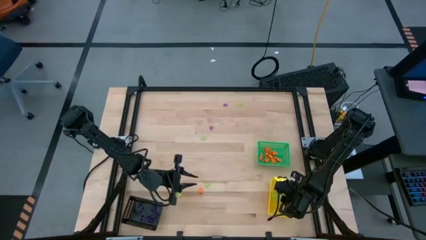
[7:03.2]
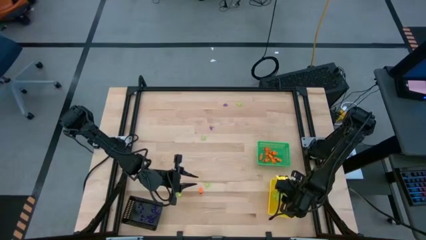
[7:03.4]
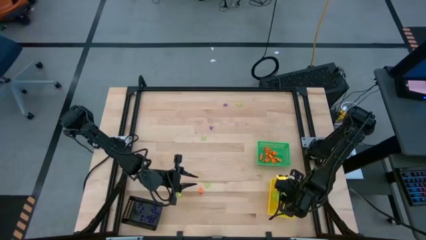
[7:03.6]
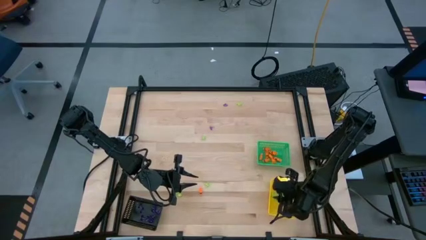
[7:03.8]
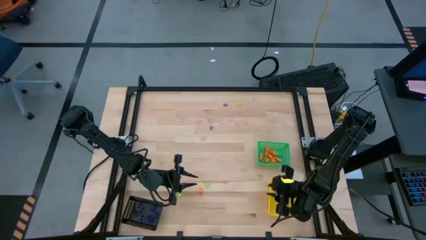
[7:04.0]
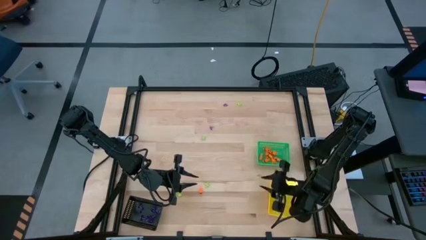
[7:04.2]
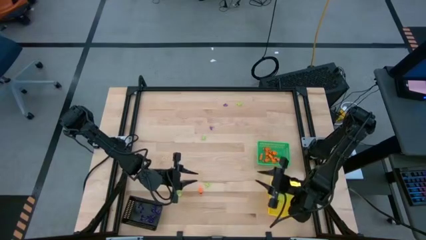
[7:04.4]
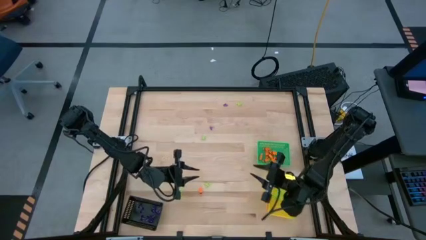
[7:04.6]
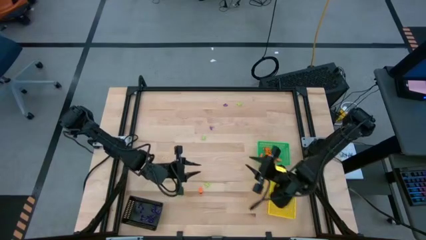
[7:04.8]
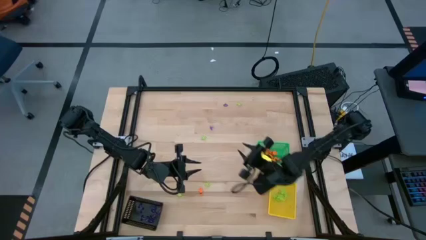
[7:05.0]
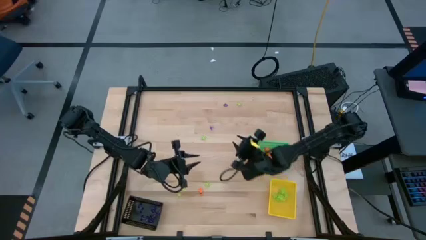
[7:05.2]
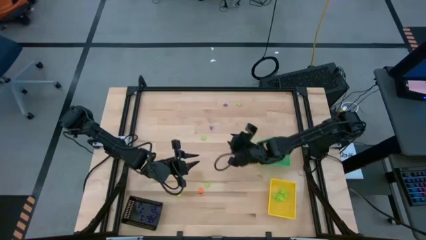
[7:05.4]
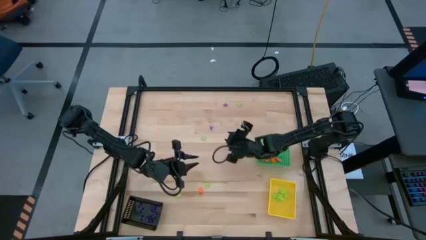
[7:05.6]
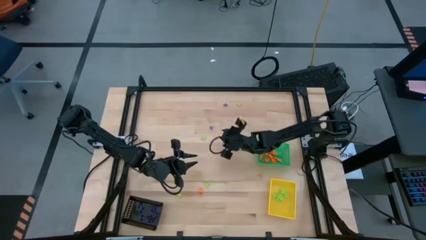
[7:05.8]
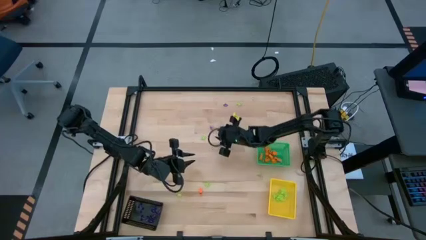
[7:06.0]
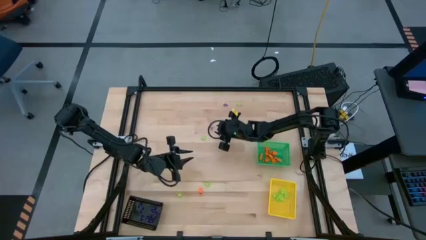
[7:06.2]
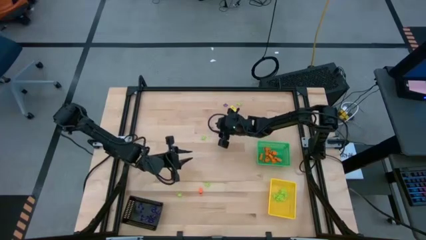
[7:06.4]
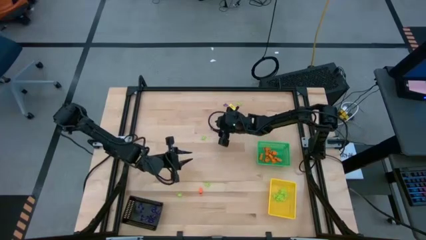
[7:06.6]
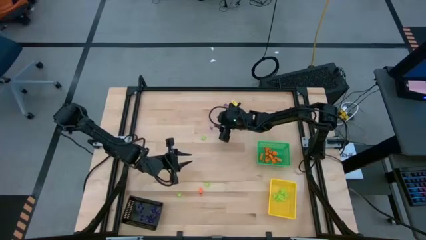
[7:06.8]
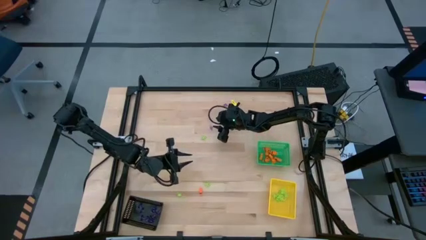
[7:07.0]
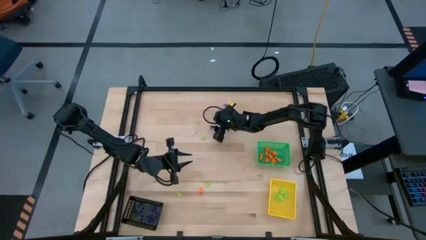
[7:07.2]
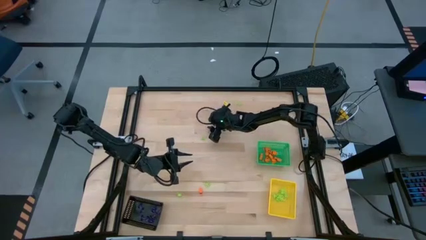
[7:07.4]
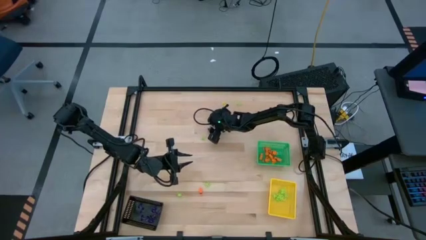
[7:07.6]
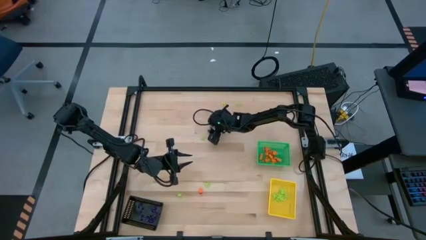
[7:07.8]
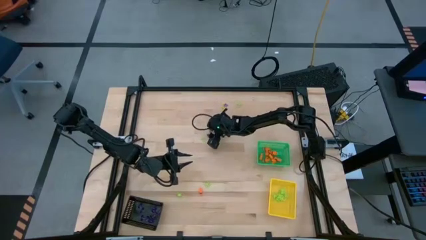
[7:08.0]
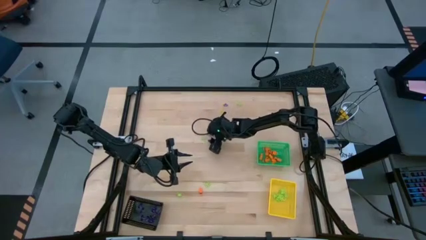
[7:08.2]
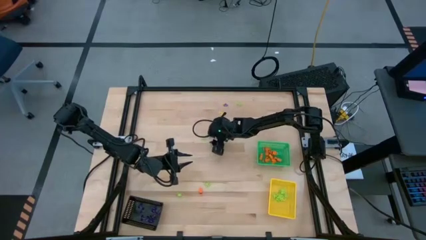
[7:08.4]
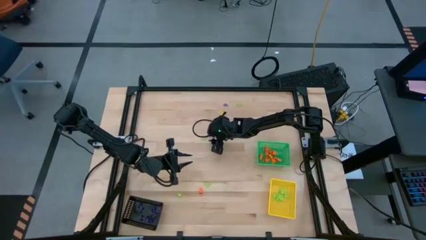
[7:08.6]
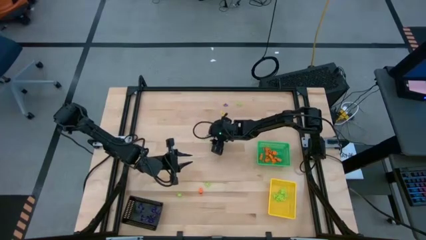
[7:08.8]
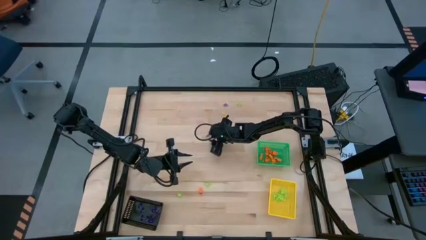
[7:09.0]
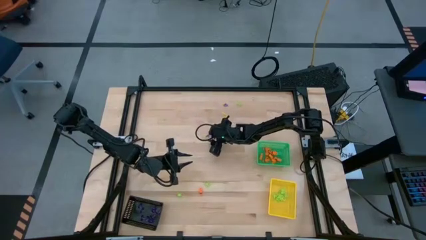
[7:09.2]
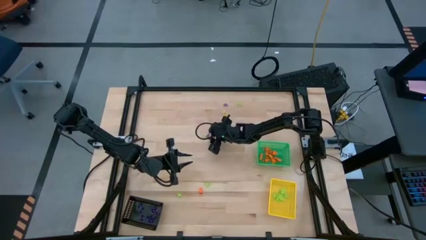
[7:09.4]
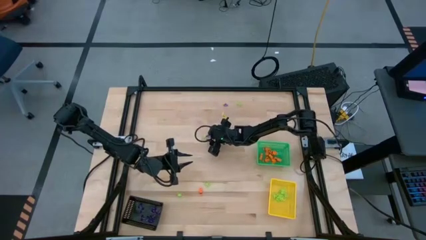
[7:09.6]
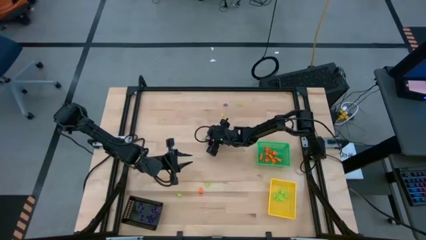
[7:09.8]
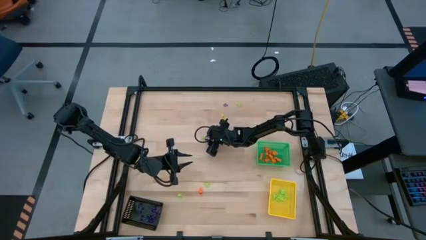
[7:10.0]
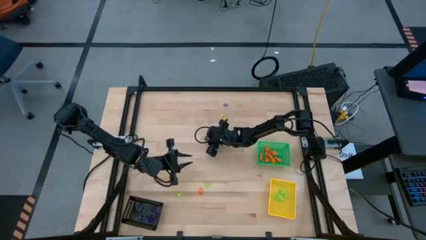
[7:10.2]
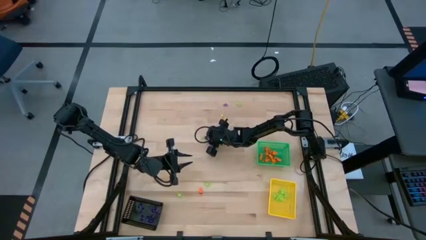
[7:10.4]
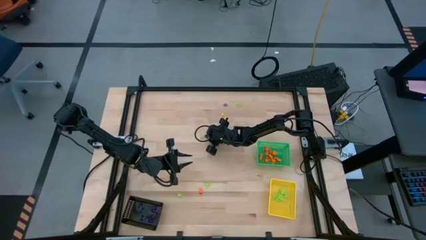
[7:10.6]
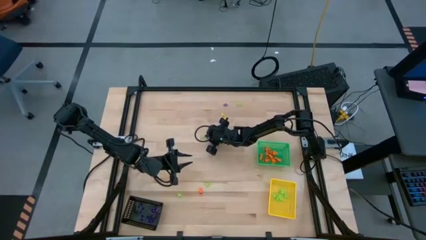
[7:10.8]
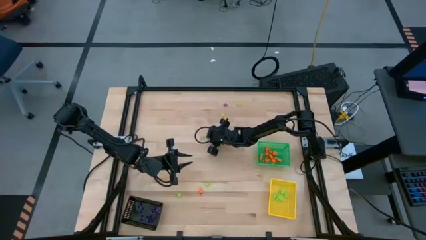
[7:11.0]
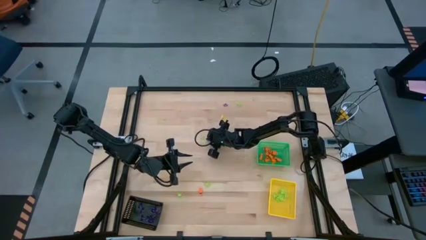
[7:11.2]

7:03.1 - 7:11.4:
Task: Sort Halloween decoration
Put the purple witch hat toy into the black bin

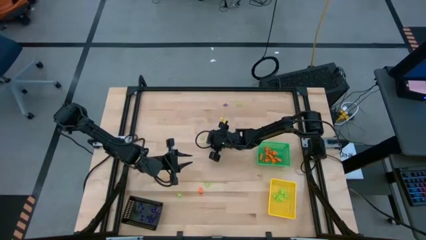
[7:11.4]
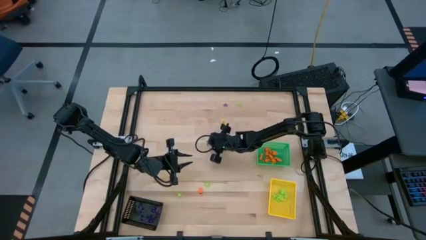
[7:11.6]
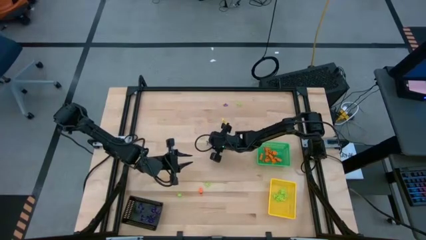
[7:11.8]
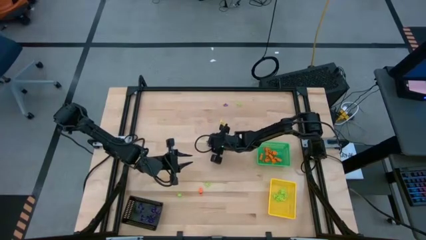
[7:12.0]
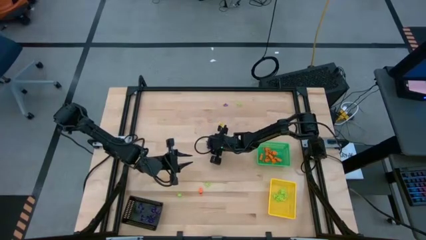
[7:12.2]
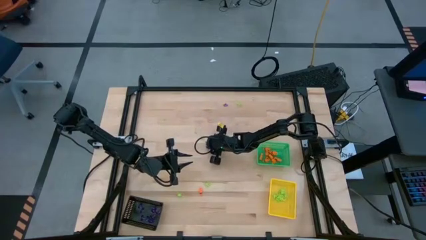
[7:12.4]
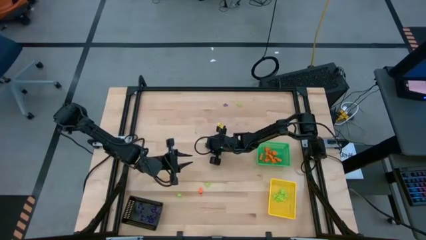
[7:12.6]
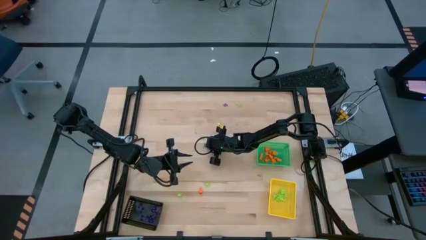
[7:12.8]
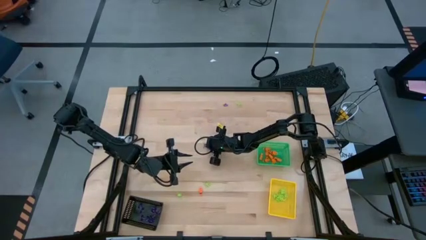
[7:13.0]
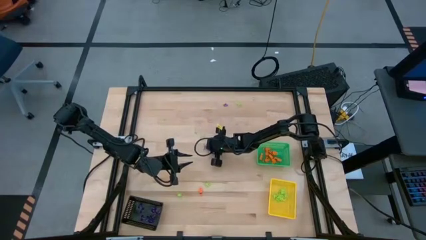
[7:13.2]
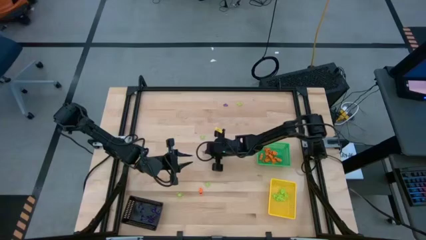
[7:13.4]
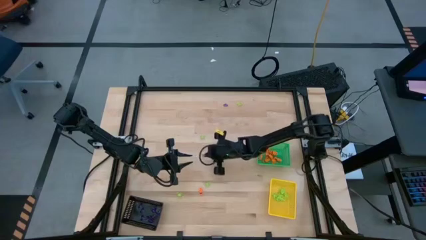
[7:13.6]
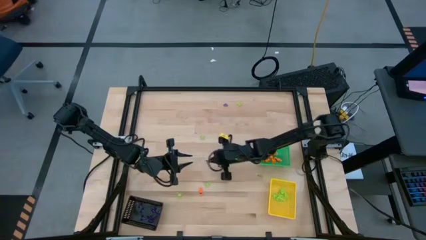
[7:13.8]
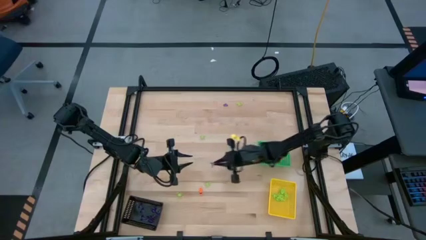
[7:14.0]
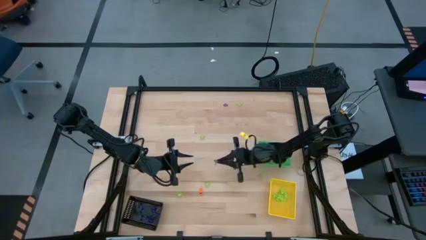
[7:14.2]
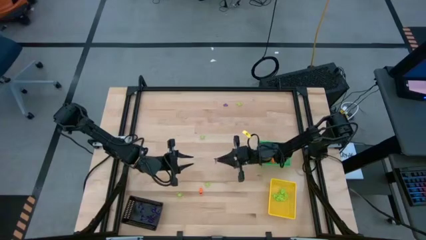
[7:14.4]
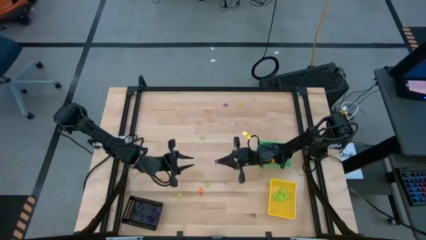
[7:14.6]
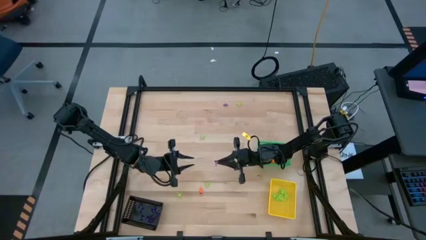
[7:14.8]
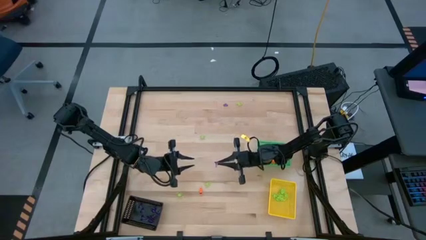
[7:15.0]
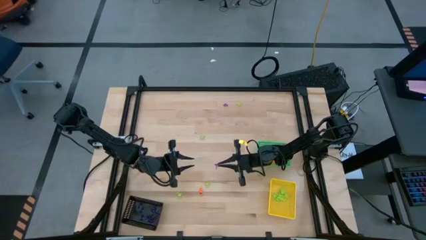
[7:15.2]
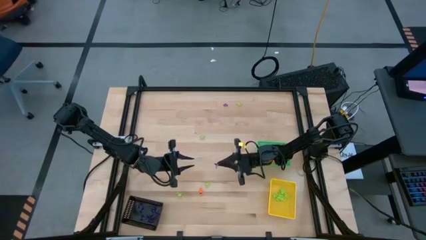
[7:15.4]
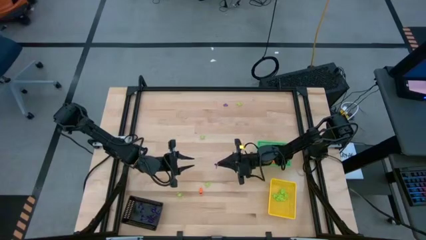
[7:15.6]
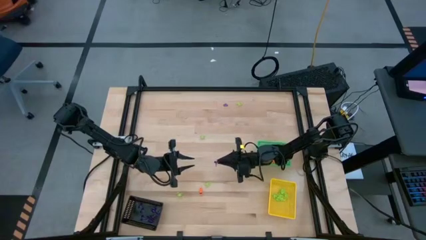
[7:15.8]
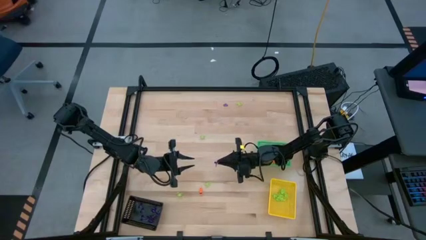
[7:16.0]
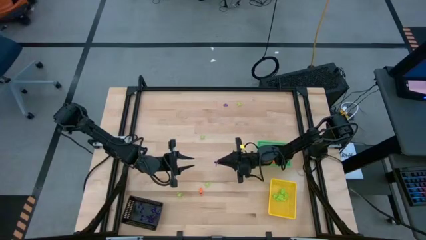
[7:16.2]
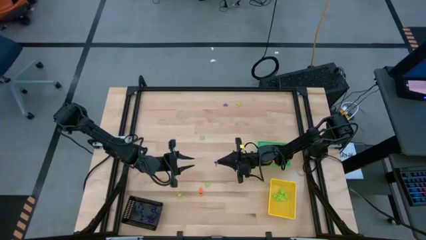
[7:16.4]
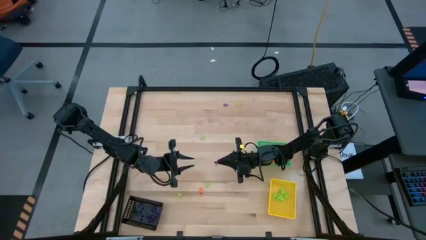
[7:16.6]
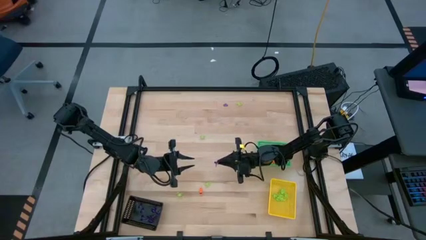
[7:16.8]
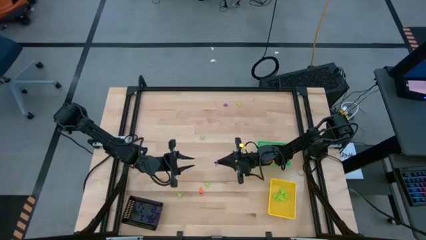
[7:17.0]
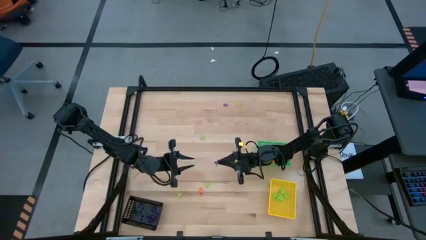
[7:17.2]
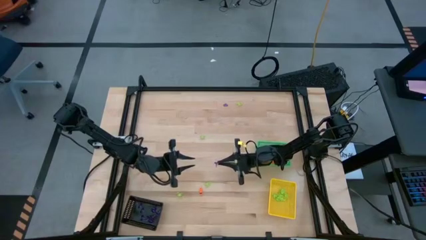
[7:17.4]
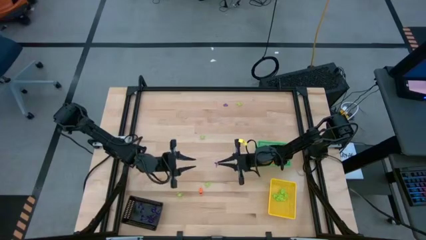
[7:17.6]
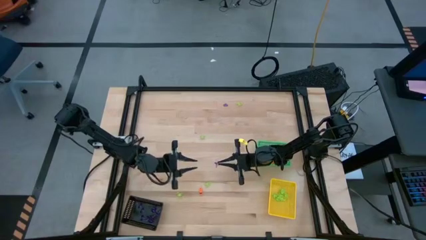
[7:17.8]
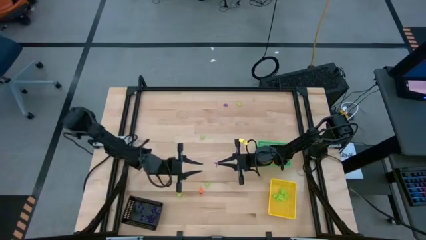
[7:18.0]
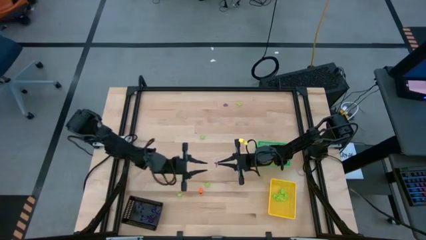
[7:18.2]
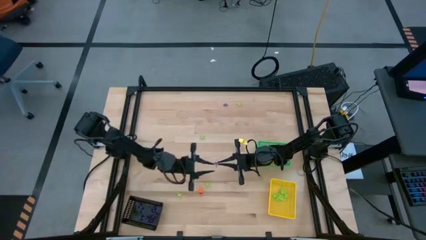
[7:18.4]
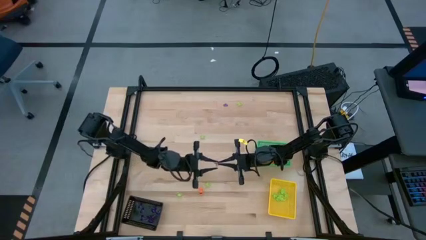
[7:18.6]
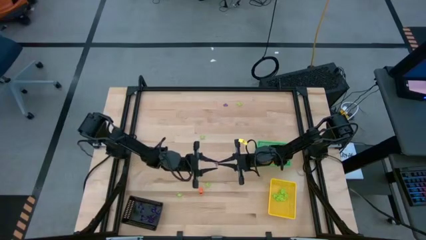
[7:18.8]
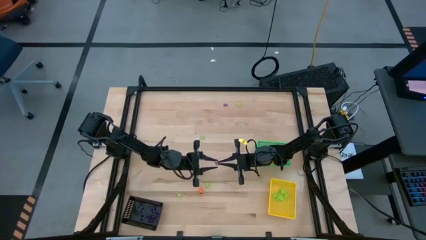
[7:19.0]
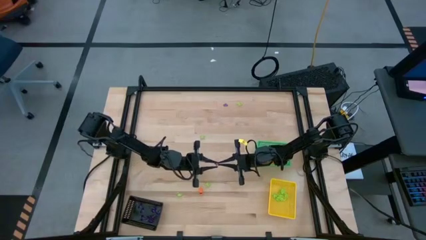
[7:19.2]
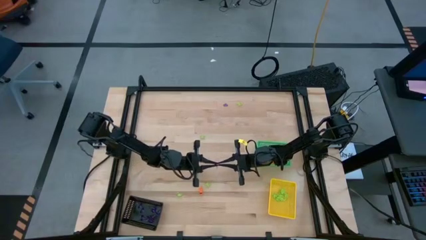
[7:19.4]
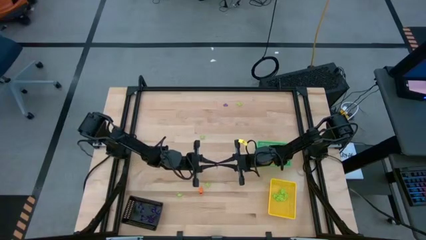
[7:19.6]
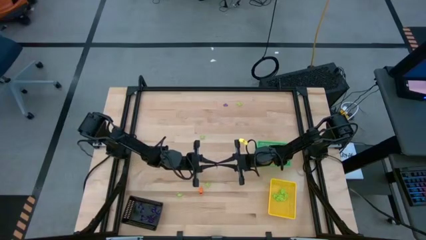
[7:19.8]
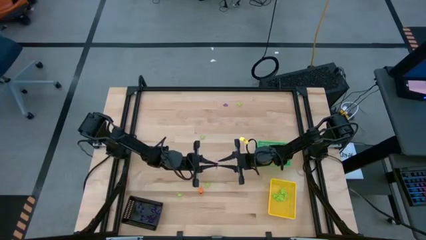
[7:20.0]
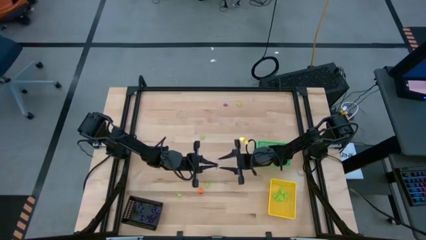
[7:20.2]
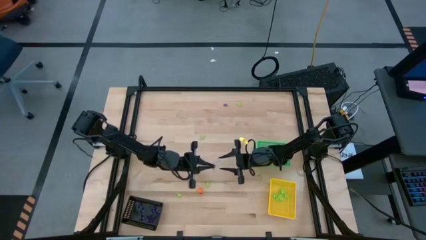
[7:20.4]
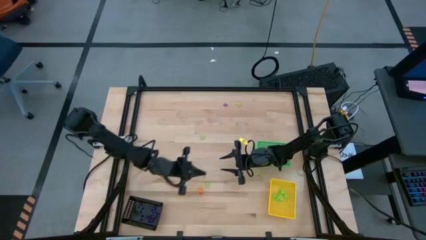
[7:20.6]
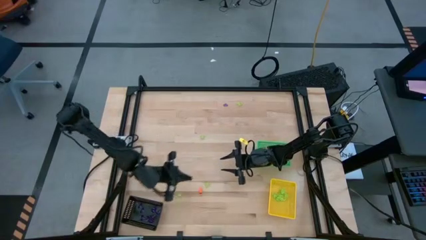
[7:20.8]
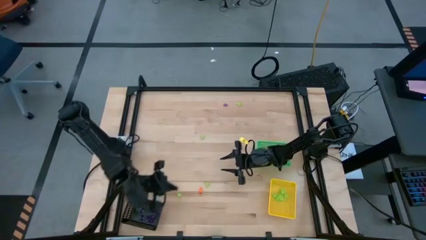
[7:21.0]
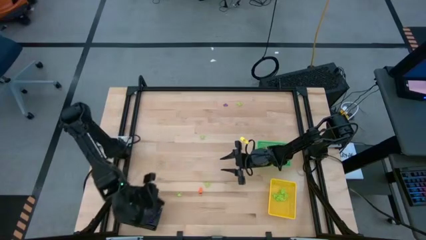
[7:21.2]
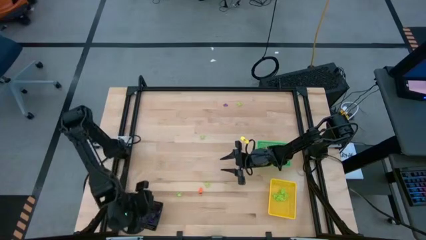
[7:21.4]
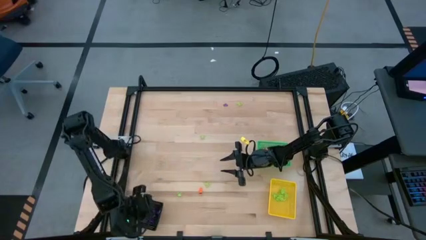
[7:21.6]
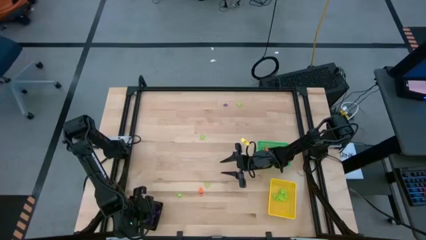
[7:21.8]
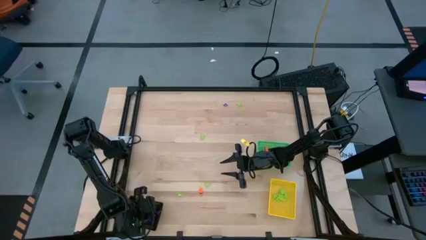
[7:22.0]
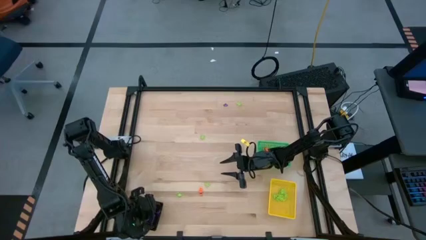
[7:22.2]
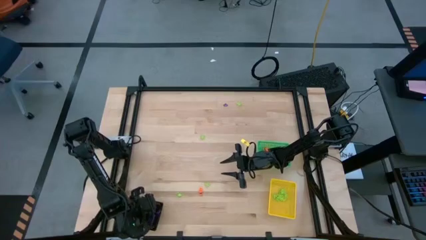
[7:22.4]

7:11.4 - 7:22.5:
Put the purple witch hat toy into the black bin
